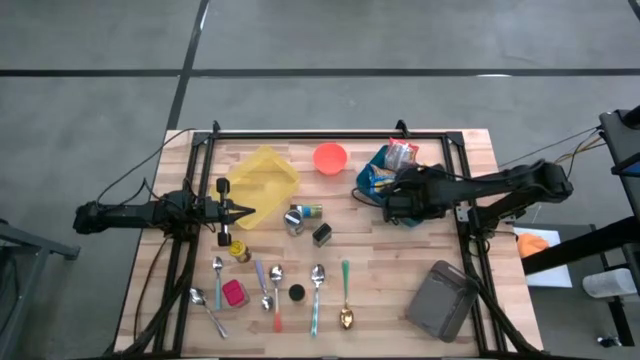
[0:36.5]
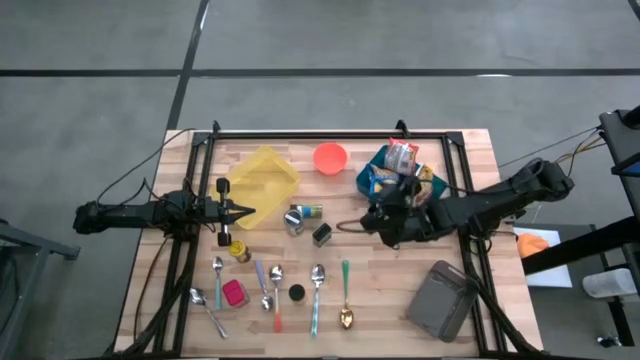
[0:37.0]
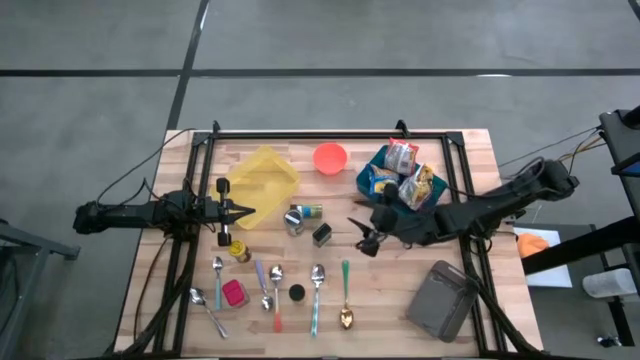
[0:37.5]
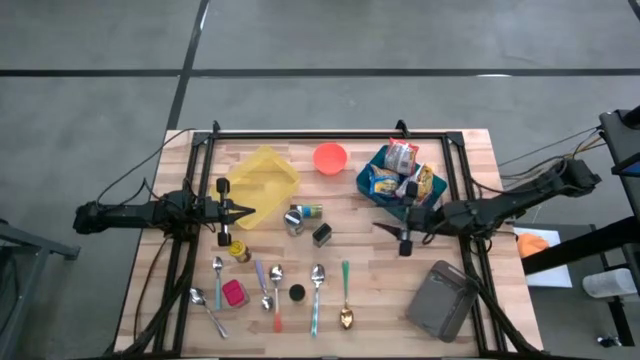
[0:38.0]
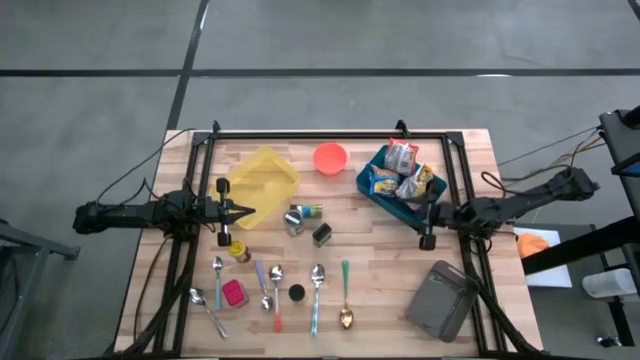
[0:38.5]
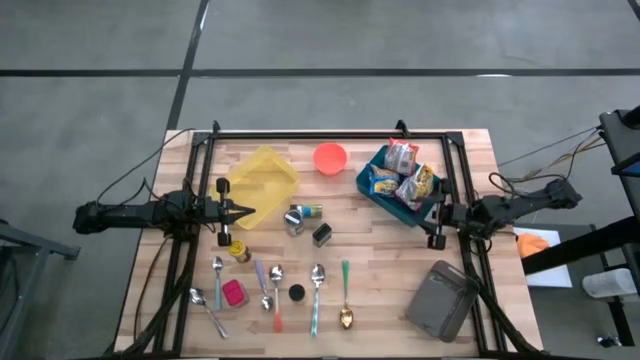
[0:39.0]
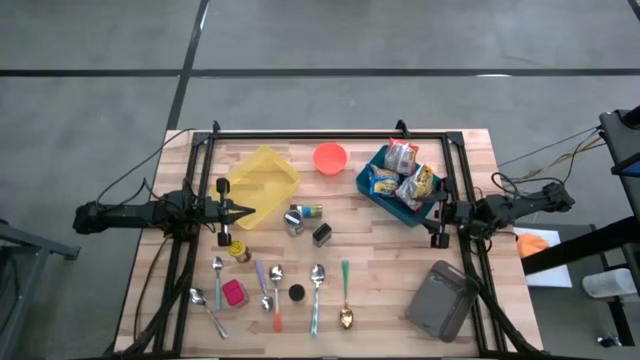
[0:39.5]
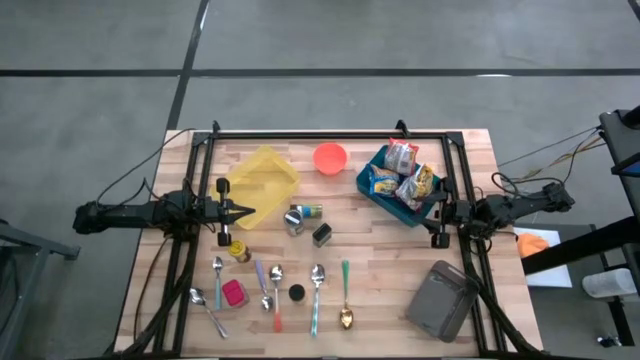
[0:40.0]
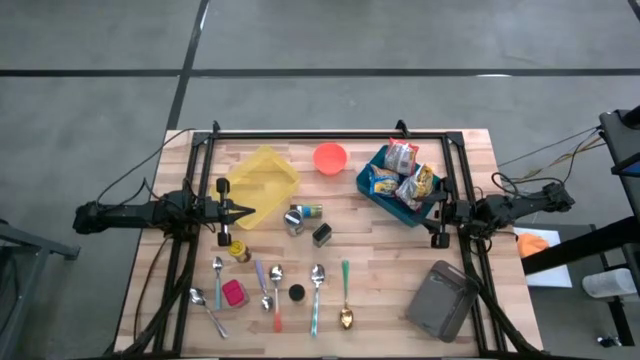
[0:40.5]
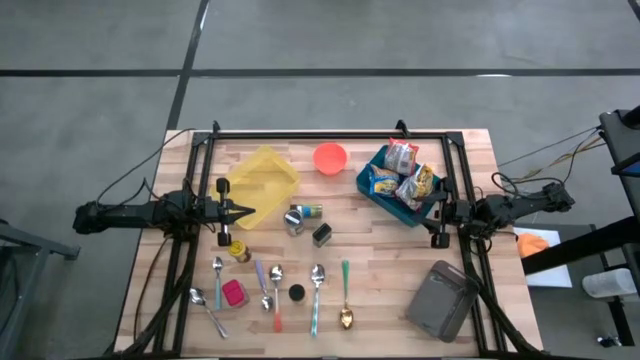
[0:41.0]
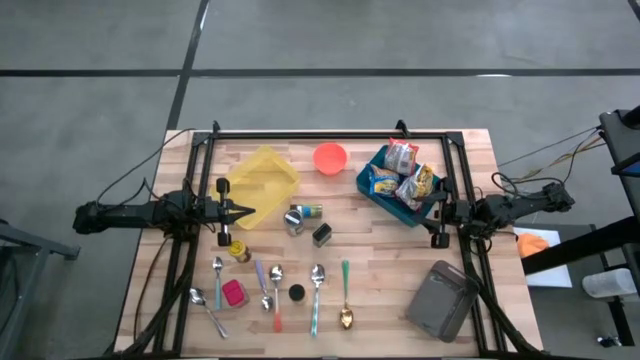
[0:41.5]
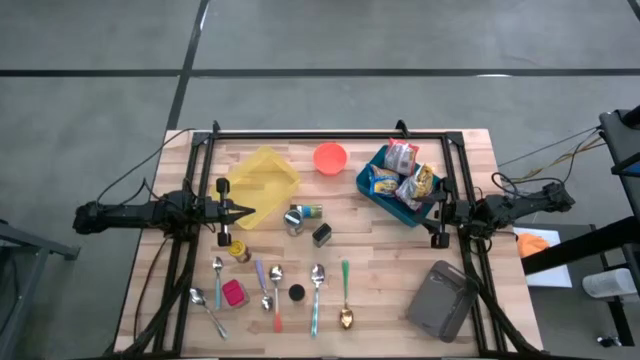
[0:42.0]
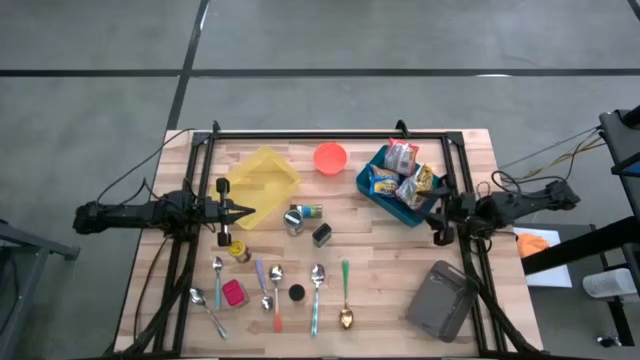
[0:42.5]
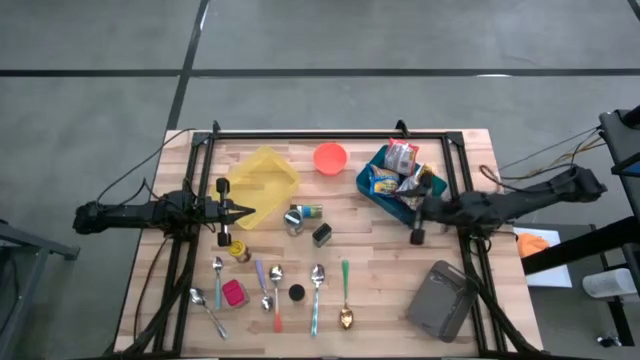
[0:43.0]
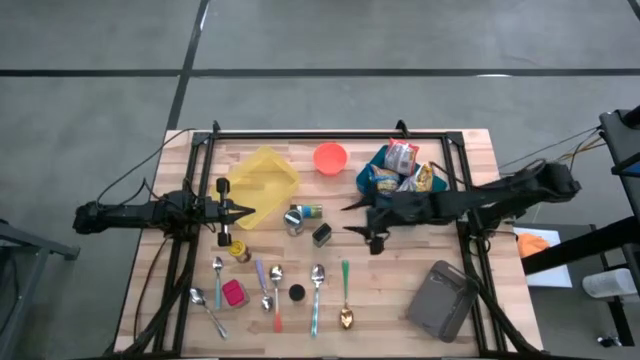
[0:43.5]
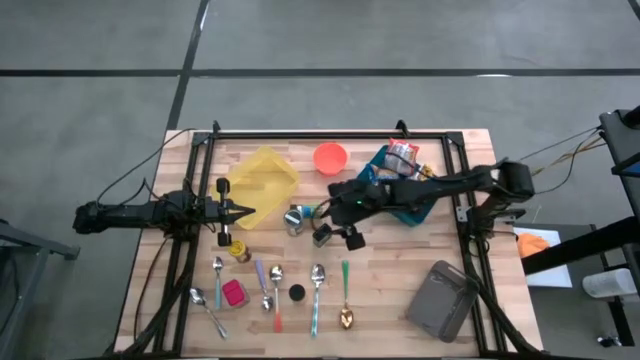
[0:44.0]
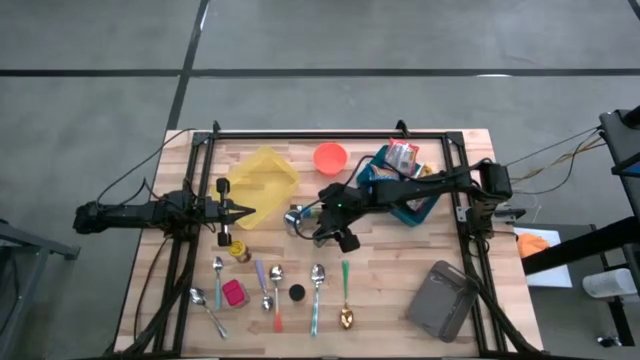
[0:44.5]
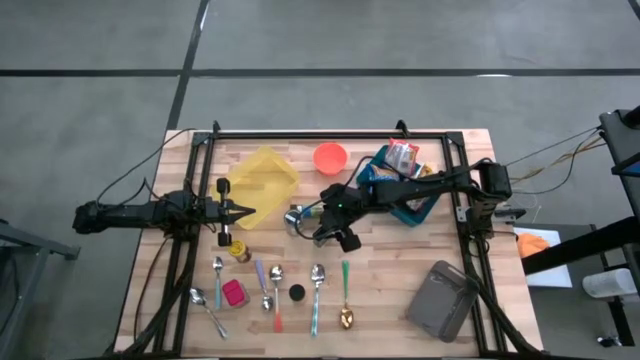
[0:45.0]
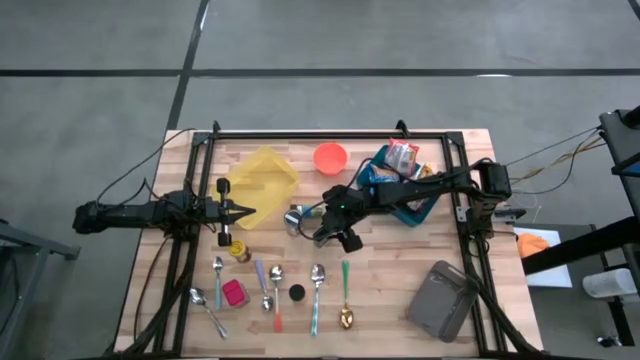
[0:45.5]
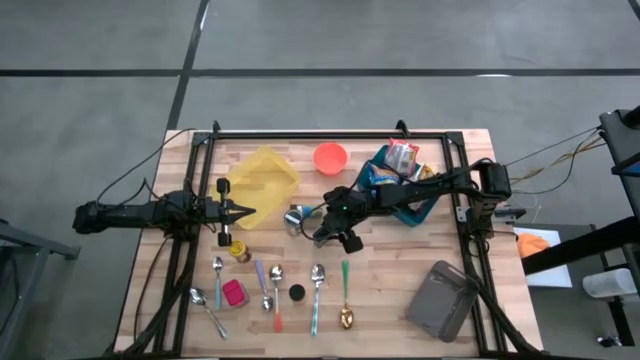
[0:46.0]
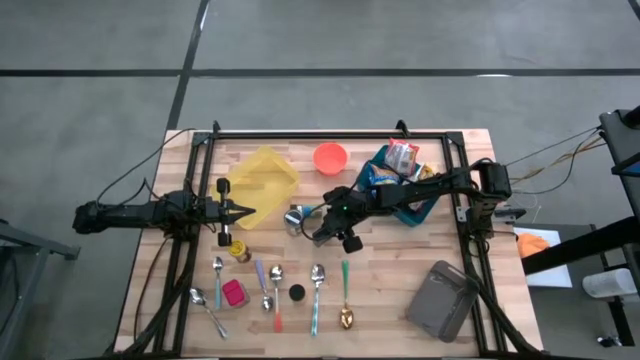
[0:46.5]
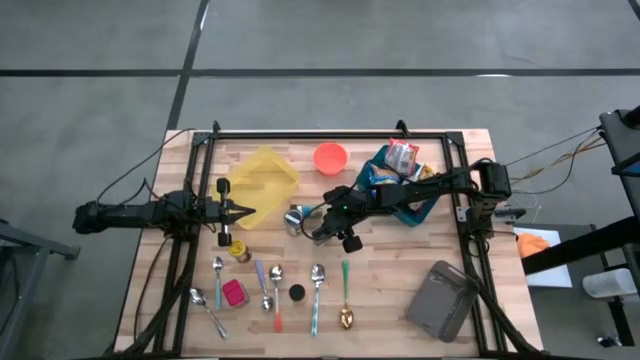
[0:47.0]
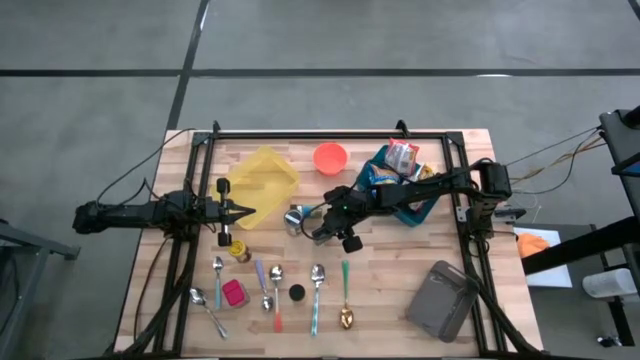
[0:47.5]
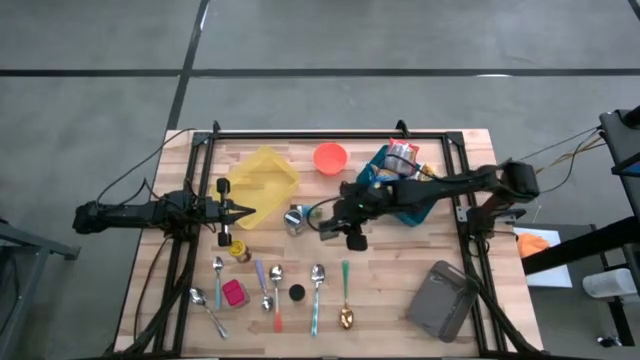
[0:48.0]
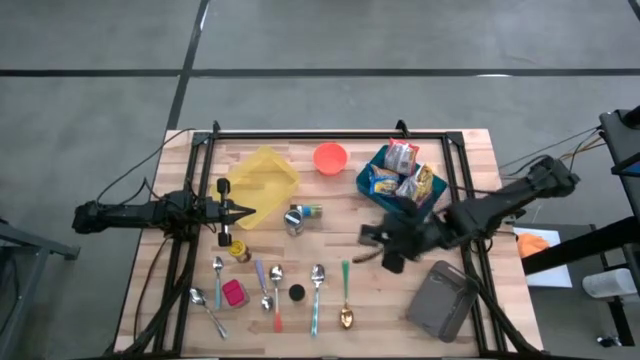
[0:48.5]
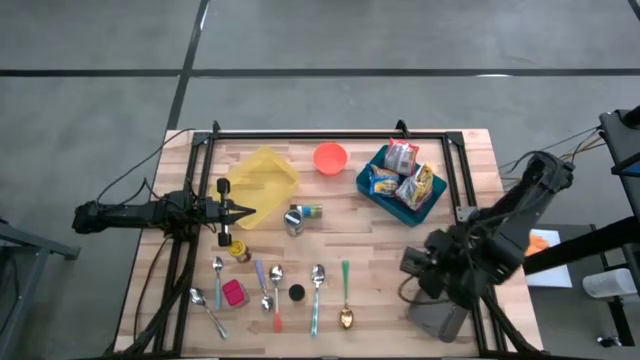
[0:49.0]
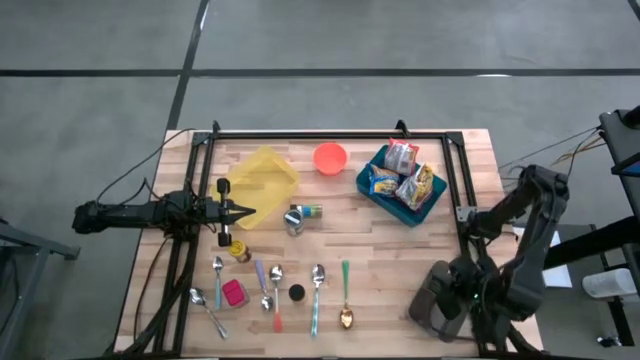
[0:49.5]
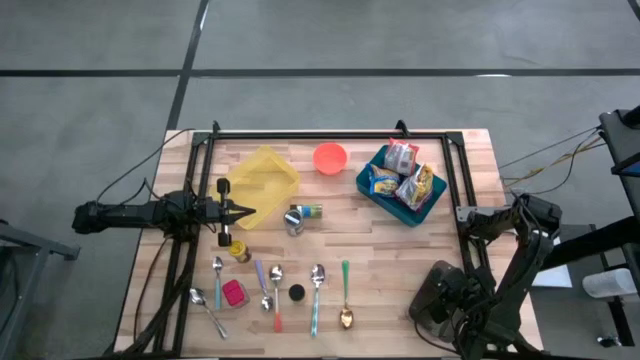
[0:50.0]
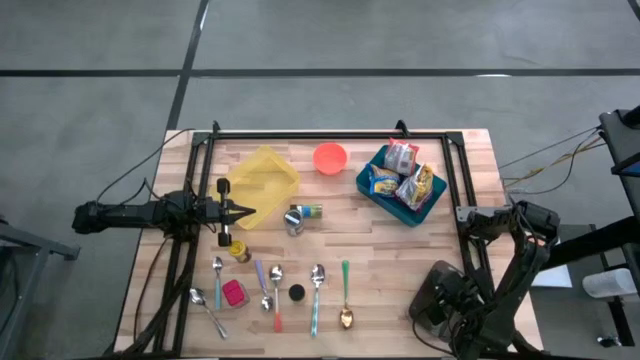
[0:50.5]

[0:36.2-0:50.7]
Put the black seasoning can into the black bin
